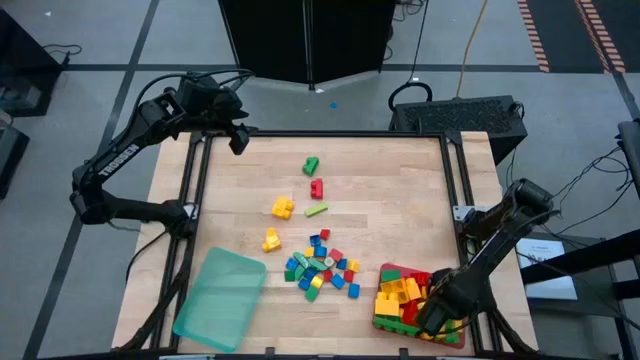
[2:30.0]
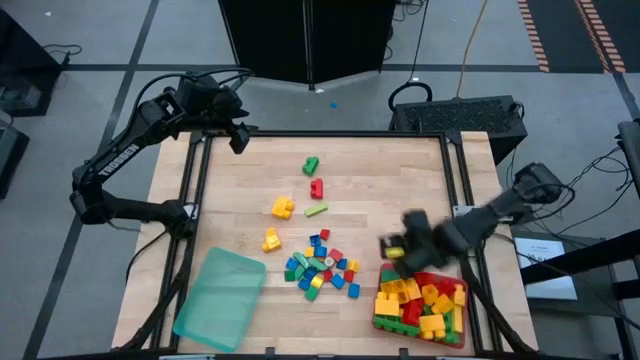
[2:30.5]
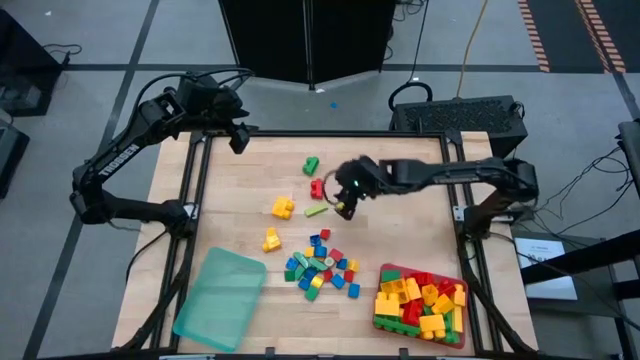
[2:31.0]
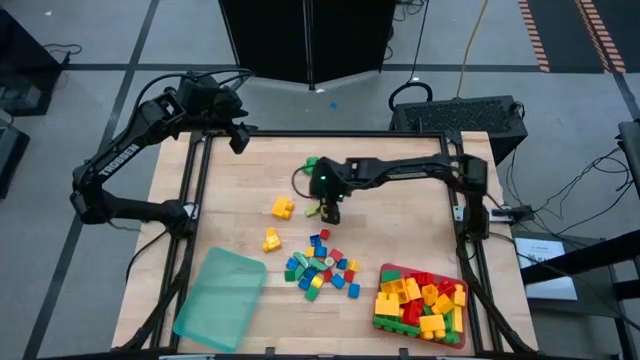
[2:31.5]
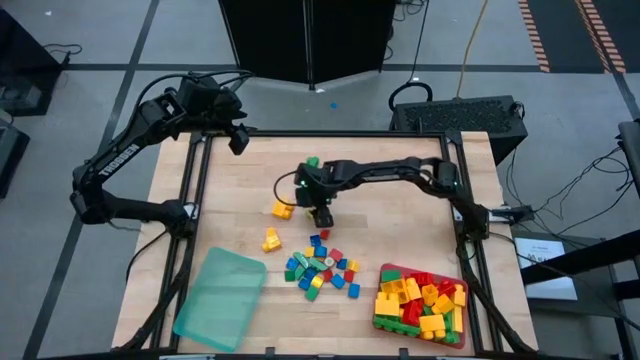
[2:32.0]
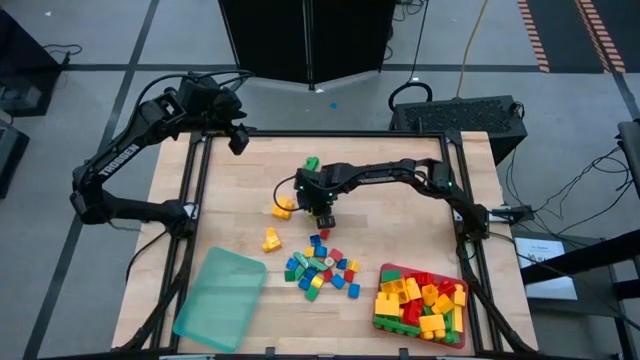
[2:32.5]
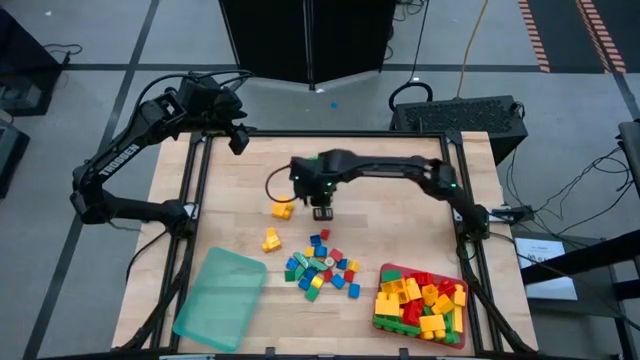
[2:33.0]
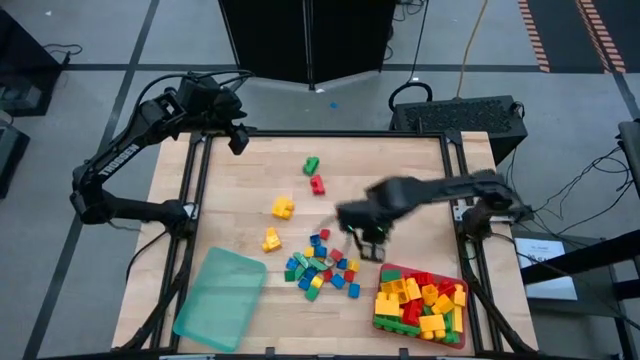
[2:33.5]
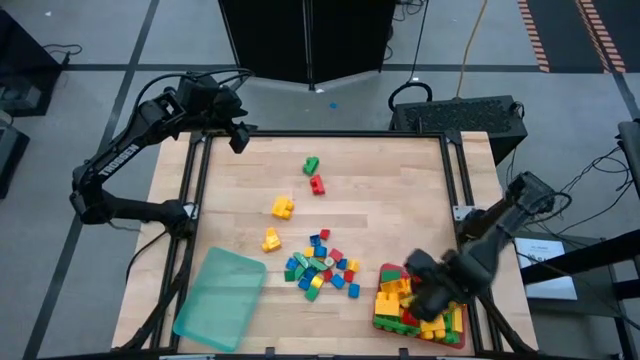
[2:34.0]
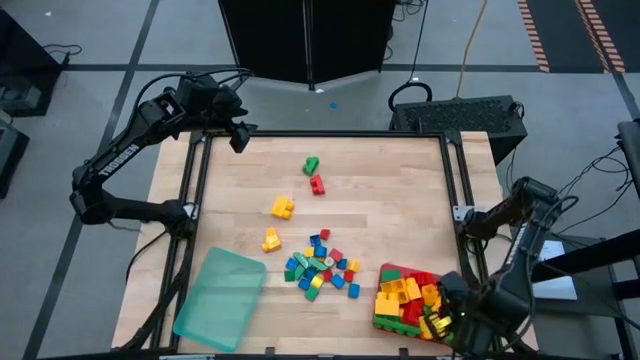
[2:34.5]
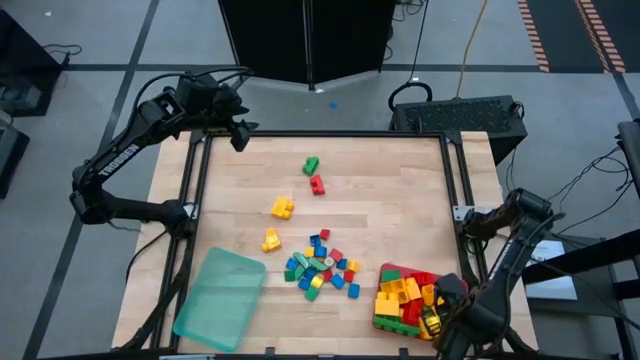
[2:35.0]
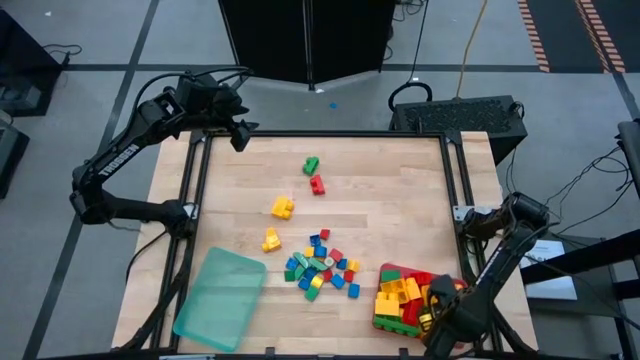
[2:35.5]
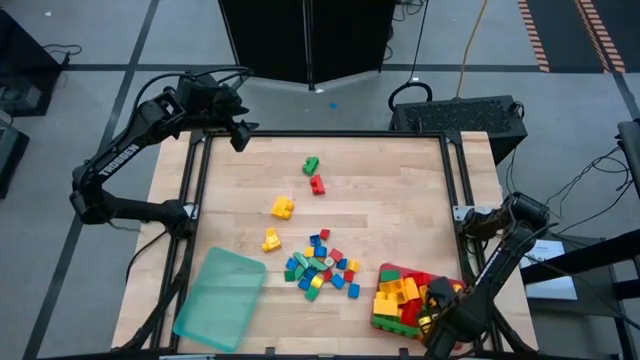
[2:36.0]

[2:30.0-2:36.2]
Task: Sort blocks by size
Put the green block into the pink bin

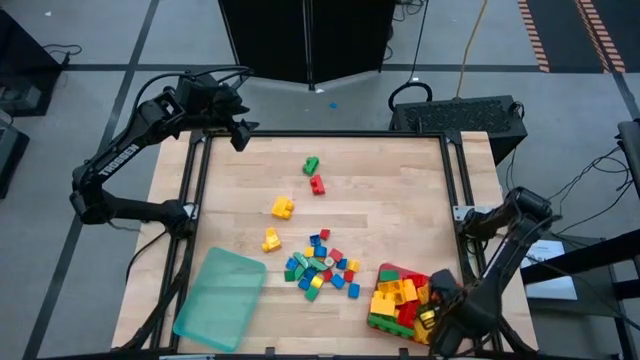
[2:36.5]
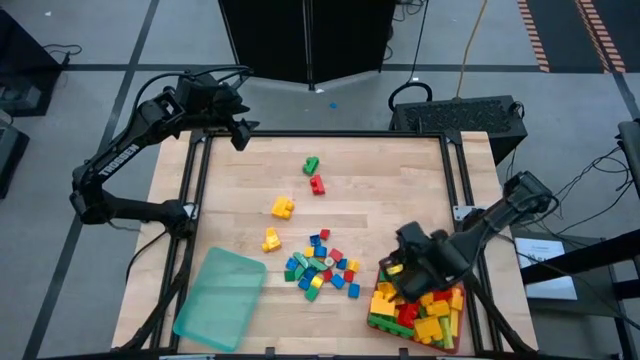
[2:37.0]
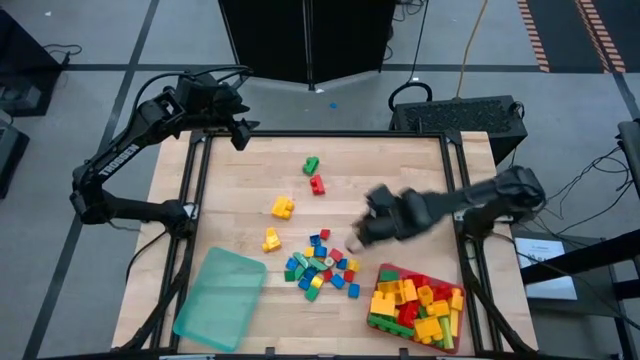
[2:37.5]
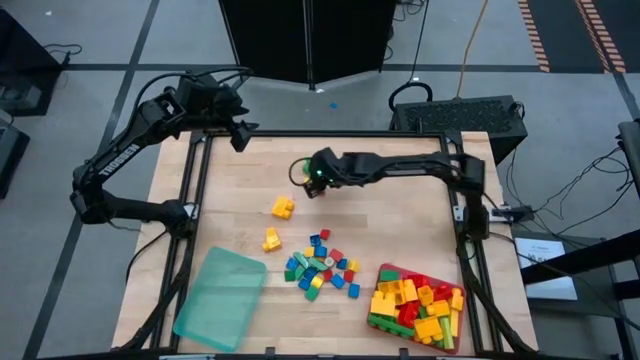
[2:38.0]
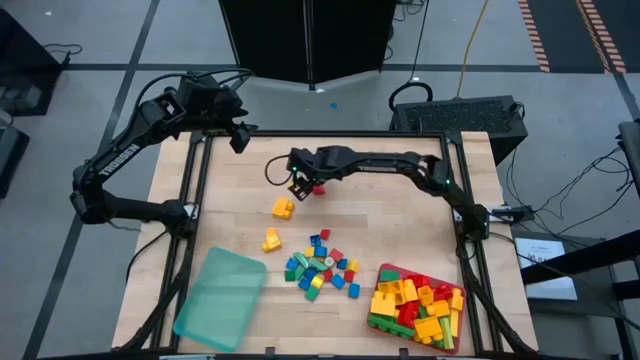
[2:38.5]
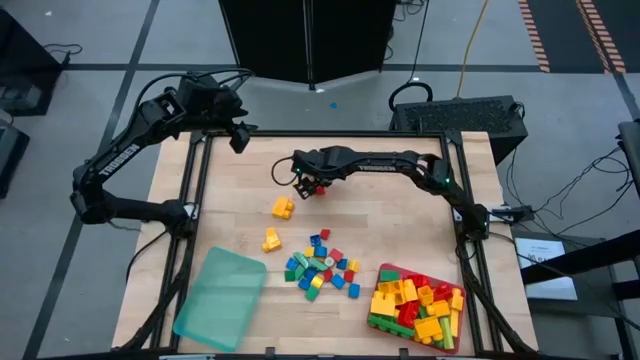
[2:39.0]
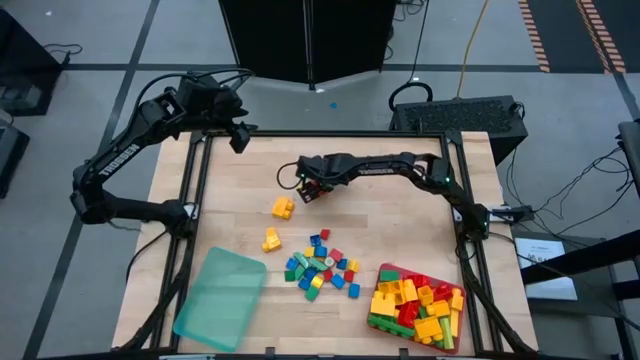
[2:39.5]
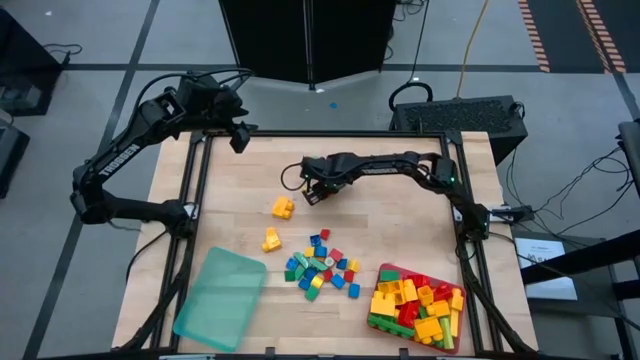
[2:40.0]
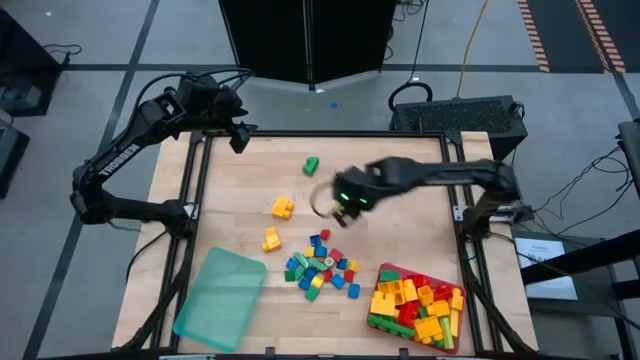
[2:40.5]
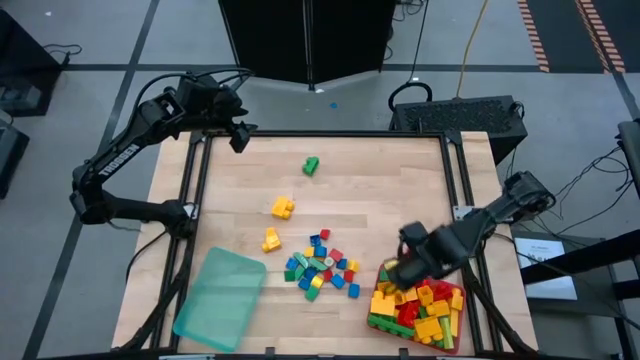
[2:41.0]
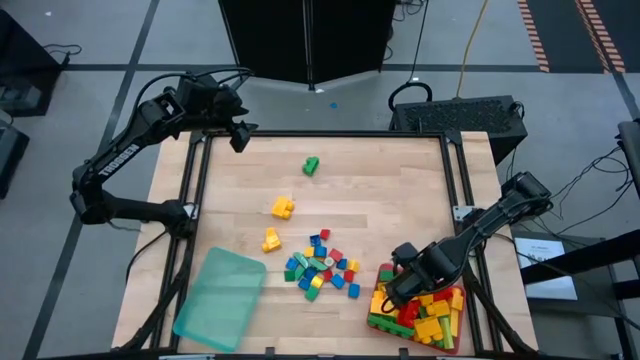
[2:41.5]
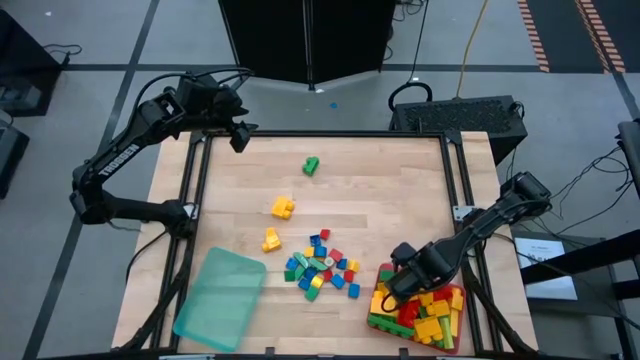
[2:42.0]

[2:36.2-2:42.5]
Put the 2-stud red game piece into the pink bin

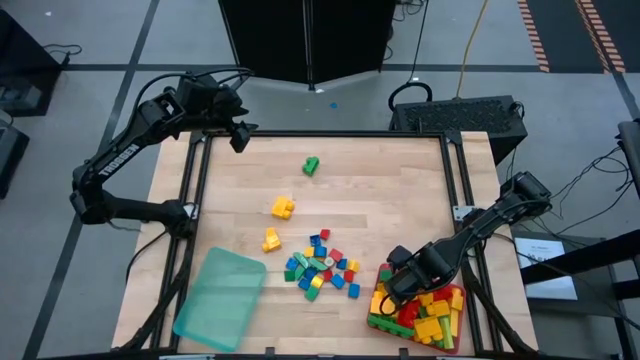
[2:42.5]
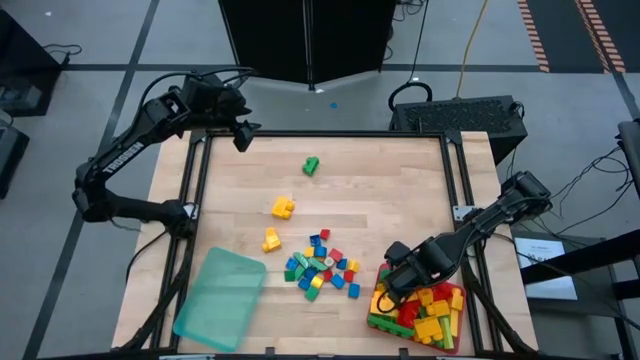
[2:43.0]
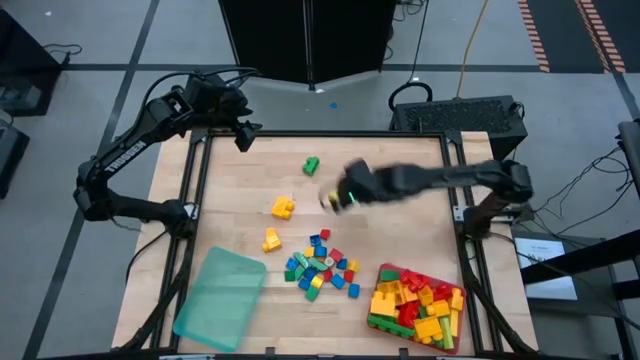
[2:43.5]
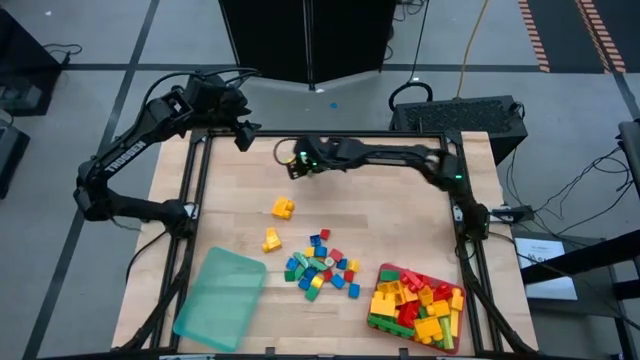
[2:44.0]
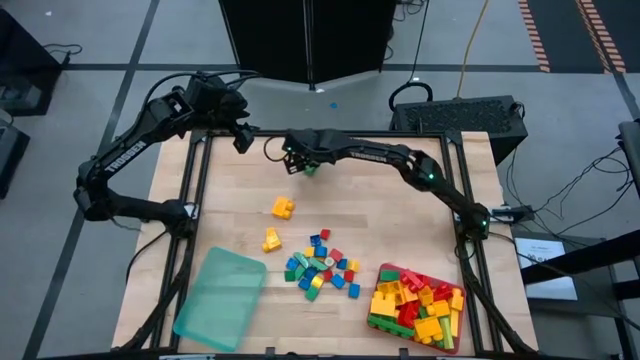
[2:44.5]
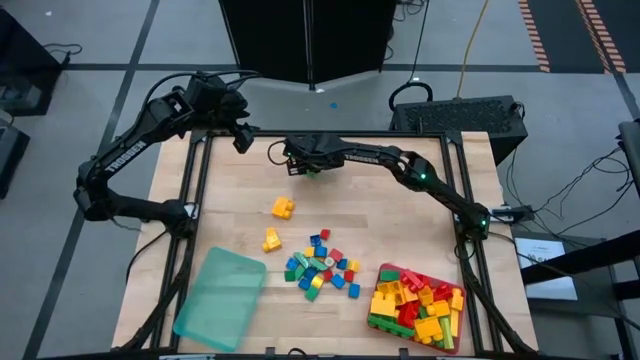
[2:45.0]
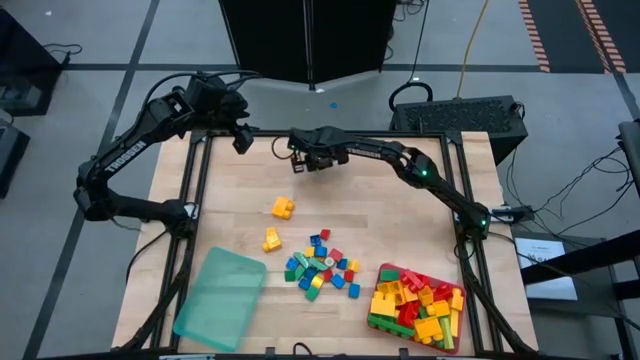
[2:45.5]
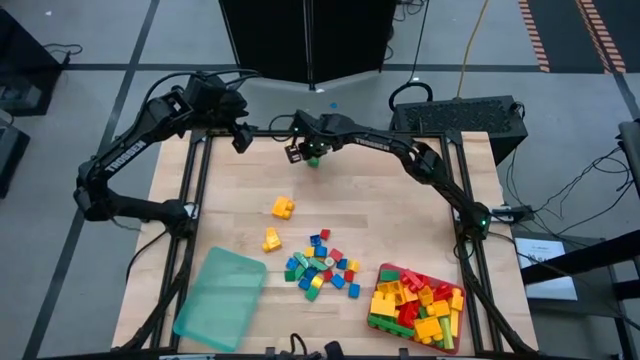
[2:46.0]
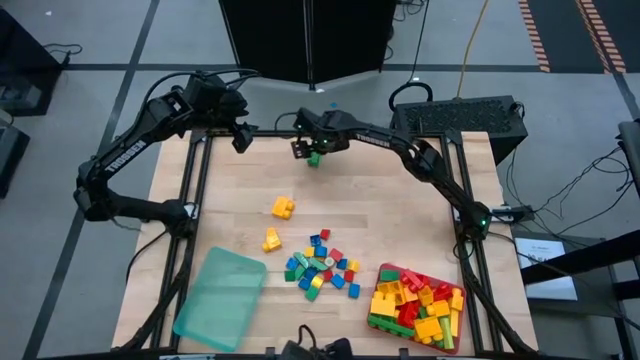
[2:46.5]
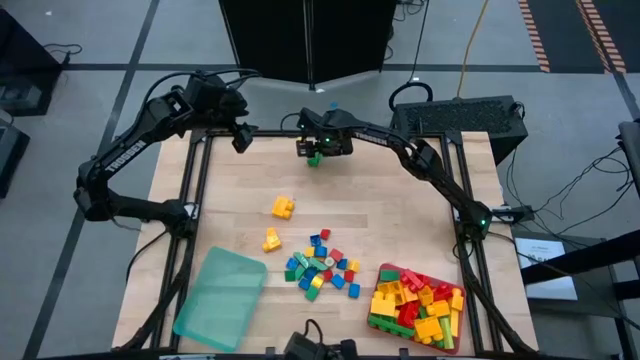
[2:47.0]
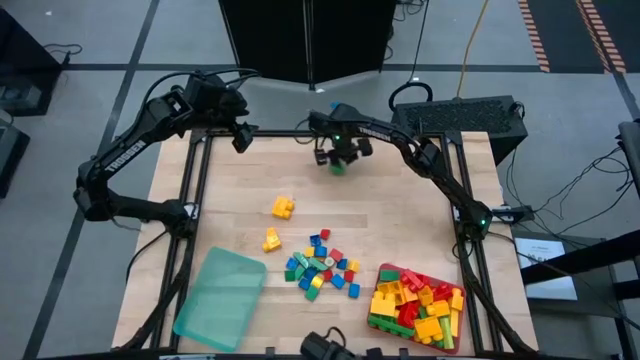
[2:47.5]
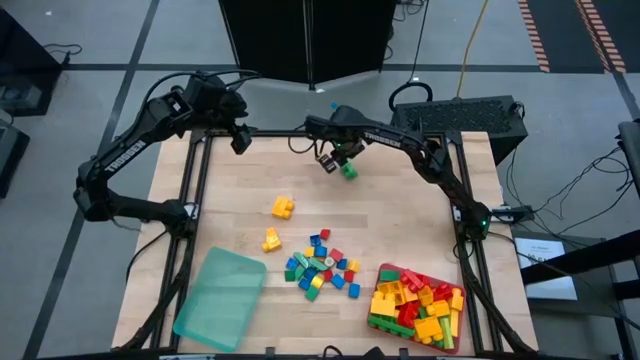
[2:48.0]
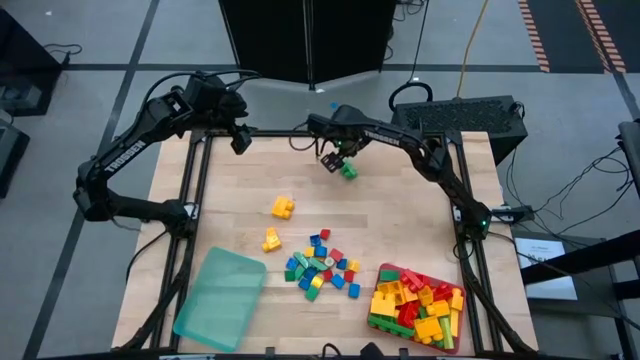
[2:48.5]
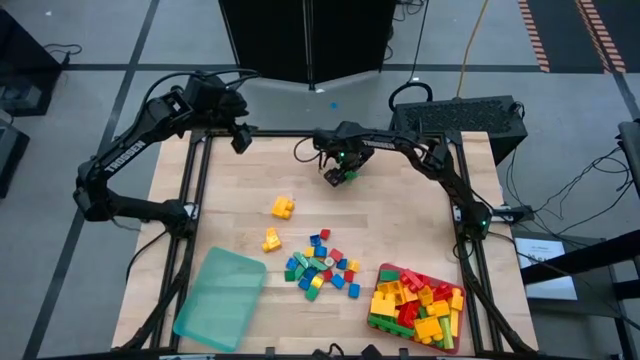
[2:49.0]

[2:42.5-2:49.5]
Put the 2-stud green game piece into the pink bin

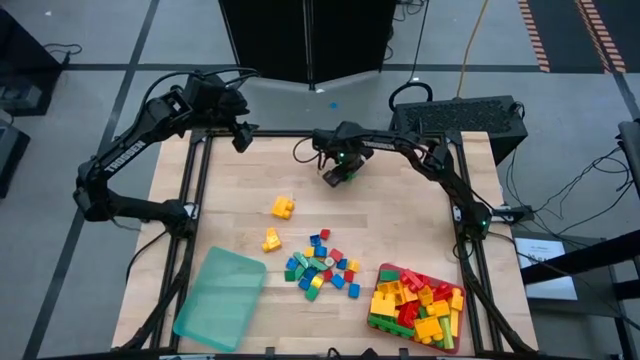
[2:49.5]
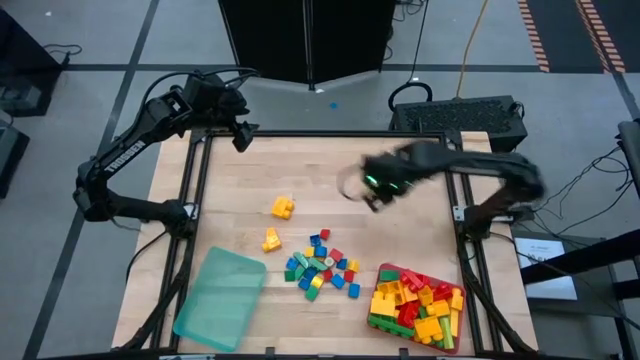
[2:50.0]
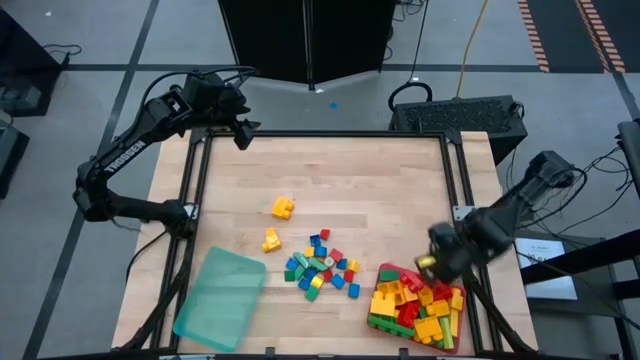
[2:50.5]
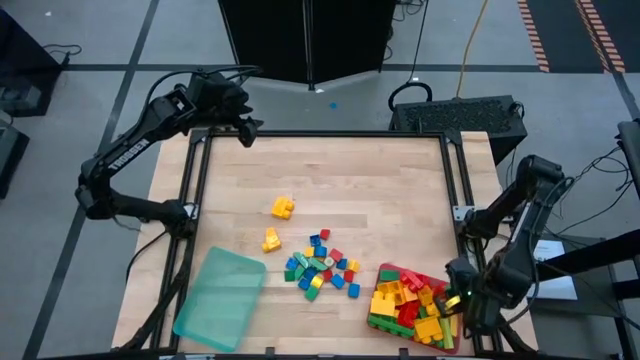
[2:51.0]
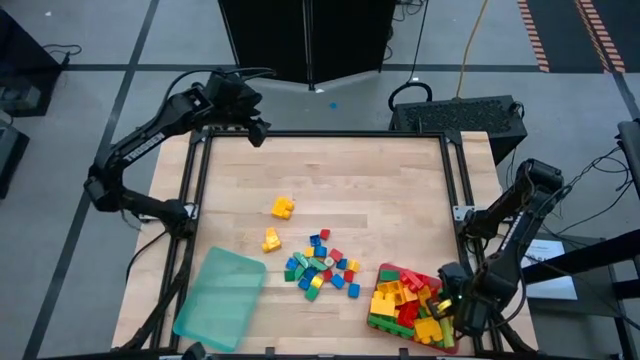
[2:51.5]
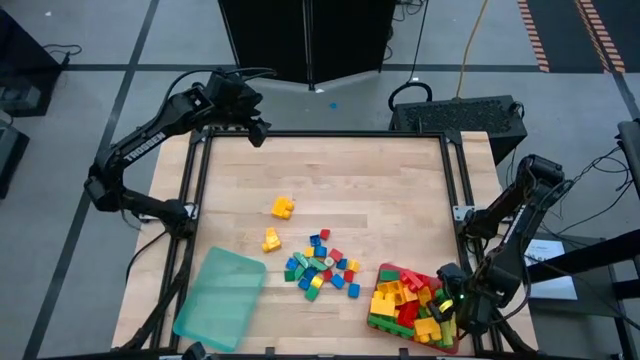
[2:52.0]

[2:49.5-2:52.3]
Put the 2-stud green game piece into the pink bin
